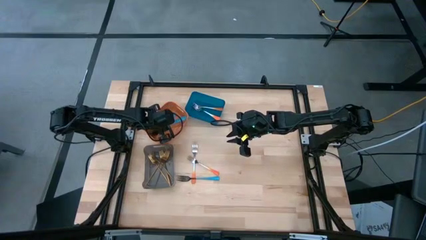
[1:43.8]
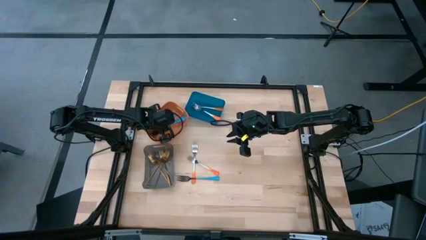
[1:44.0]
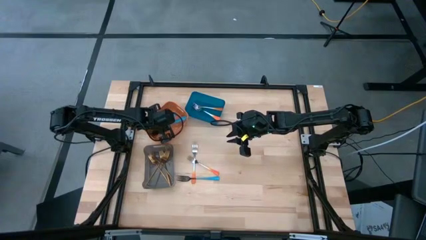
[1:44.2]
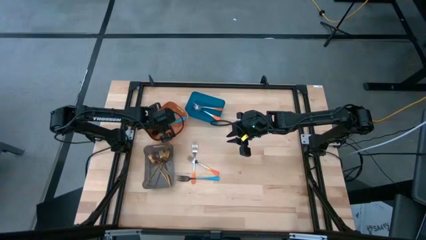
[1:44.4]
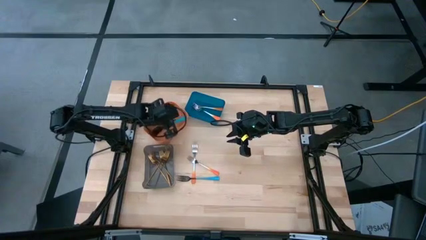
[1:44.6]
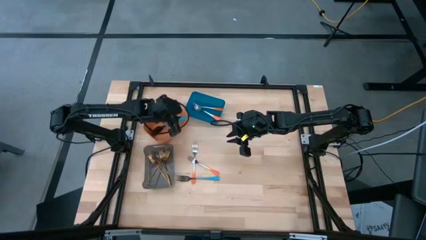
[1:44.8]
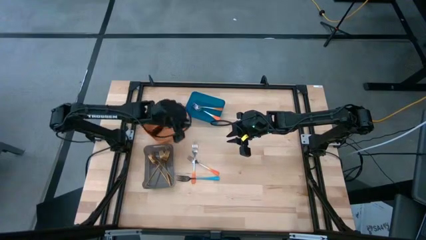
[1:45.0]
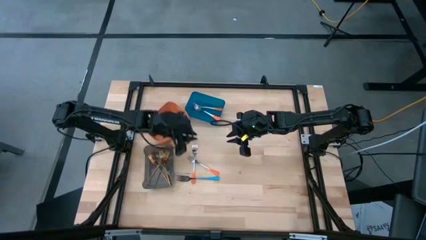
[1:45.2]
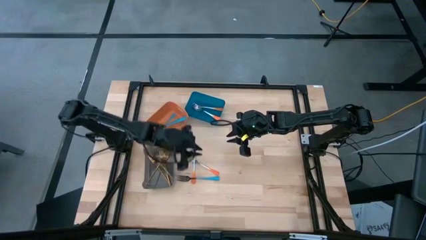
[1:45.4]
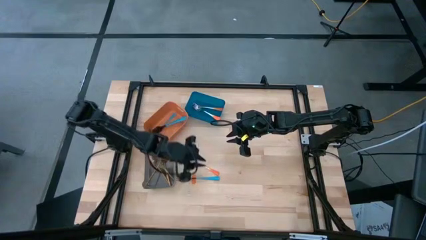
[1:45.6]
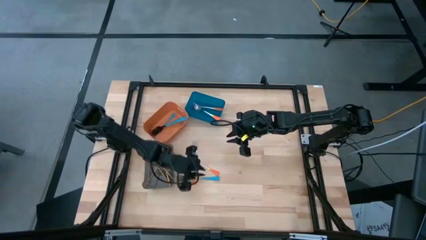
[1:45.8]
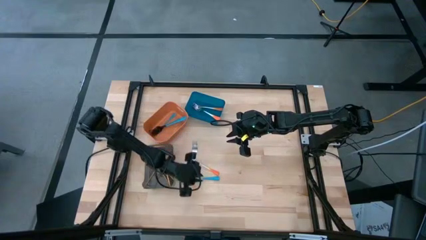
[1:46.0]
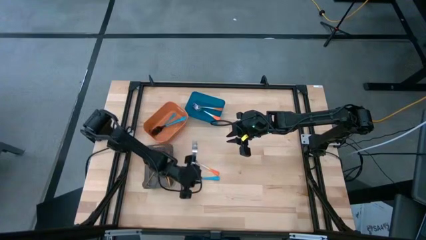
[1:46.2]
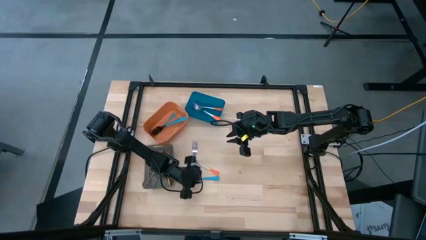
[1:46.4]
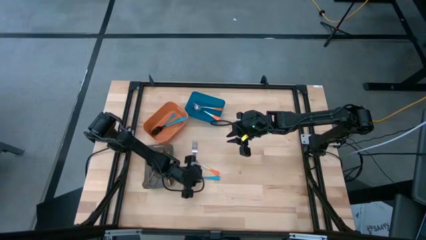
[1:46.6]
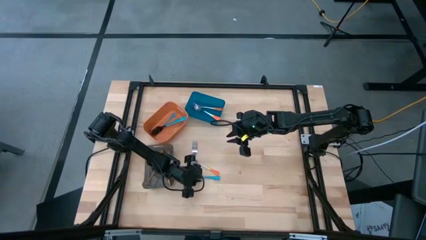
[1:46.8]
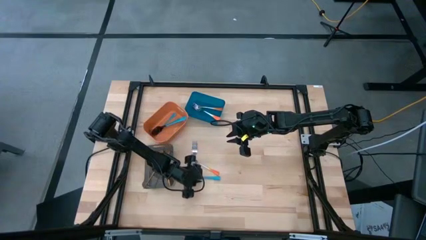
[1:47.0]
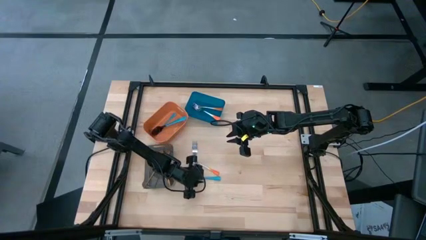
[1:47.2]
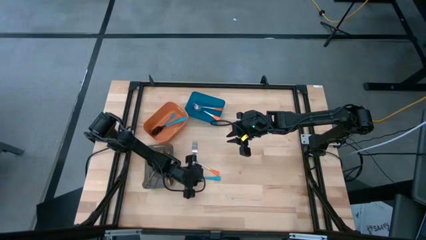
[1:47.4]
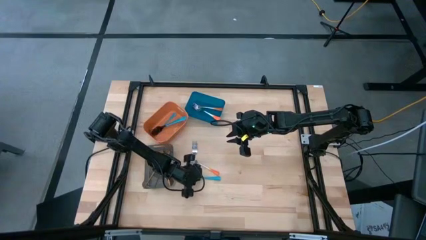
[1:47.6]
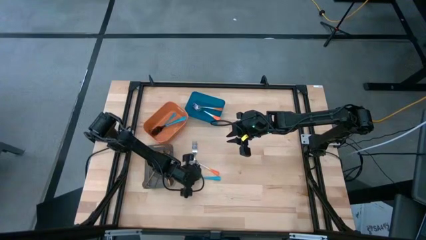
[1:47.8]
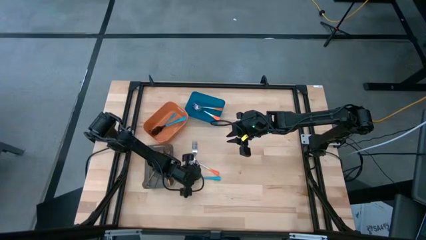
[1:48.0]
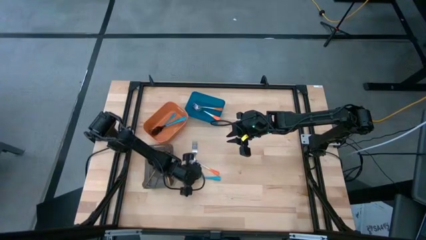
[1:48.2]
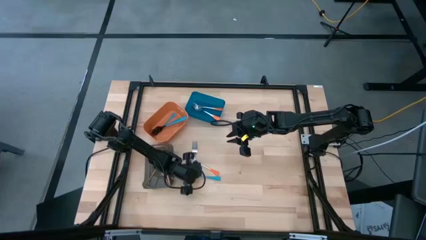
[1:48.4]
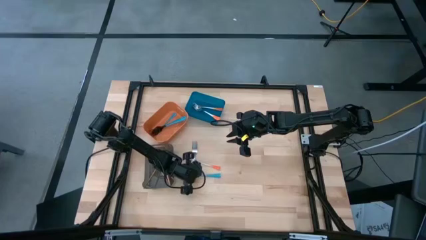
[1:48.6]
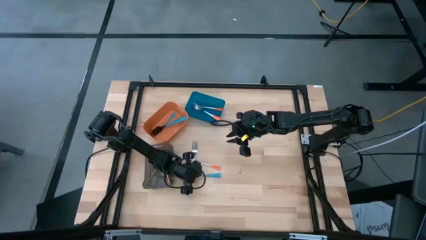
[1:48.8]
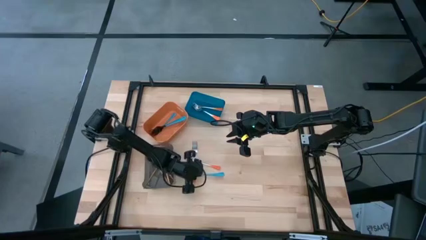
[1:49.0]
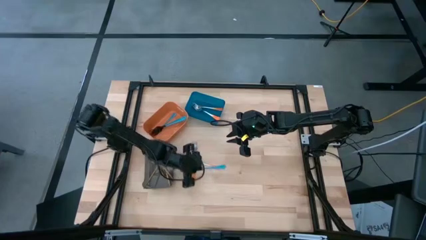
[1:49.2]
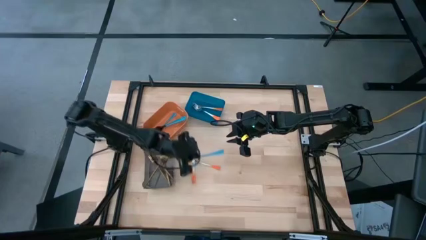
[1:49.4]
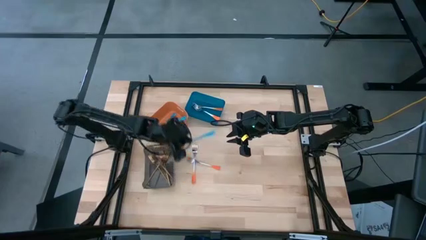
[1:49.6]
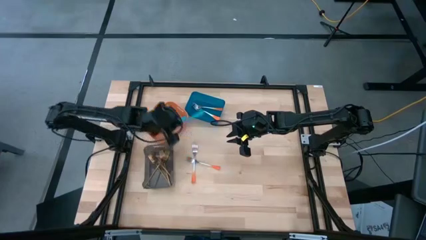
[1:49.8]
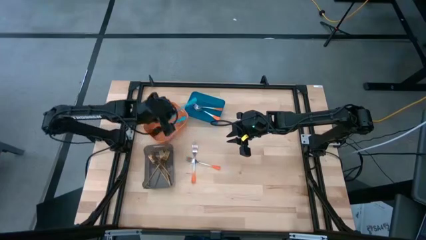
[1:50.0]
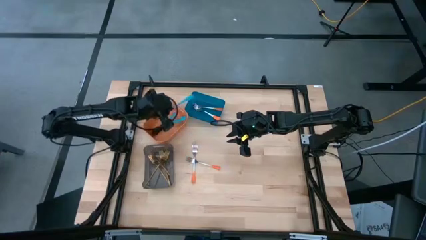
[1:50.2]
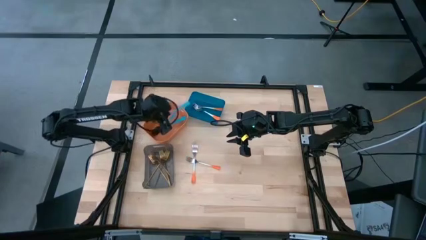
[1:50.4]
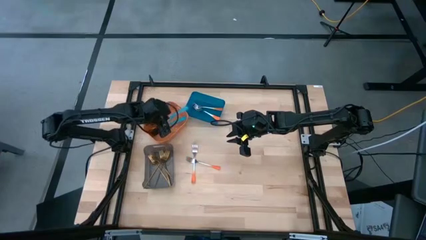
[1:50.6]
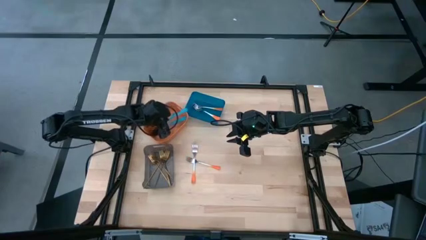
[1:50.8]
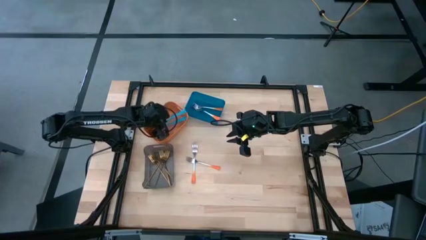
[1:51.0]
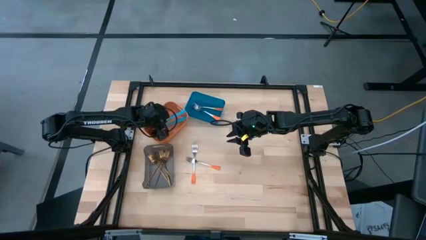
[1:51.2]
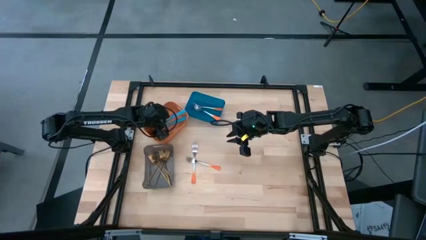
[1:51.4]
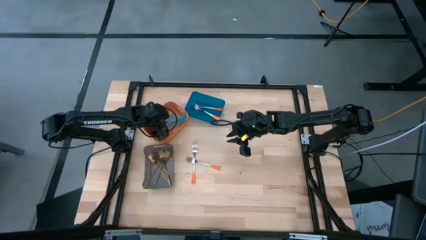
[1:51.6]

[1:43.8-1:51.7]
Task: Sort silverware by color (type)
Put the blue fork into the orange bin

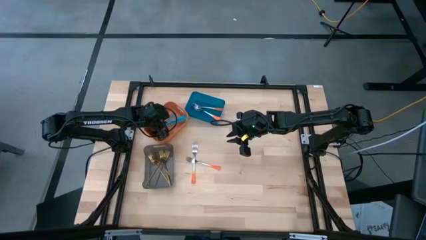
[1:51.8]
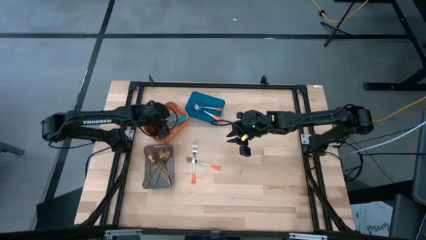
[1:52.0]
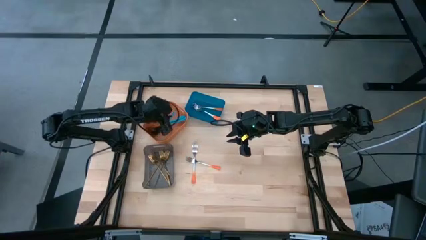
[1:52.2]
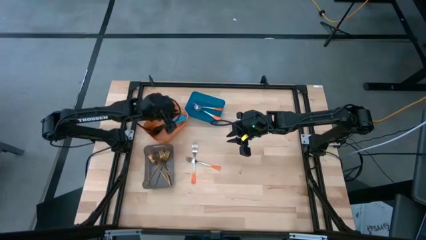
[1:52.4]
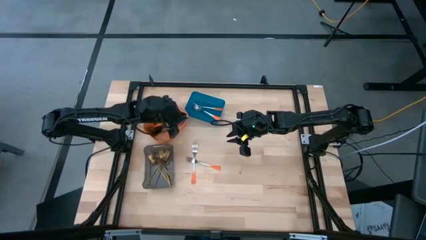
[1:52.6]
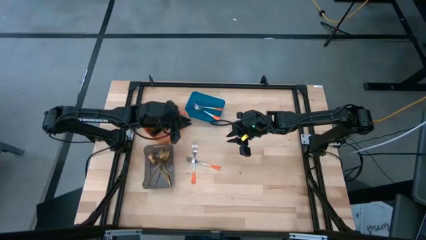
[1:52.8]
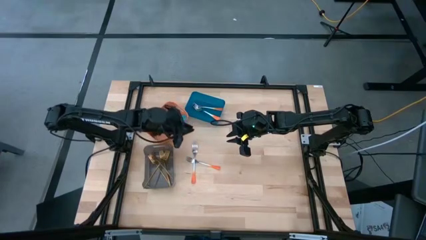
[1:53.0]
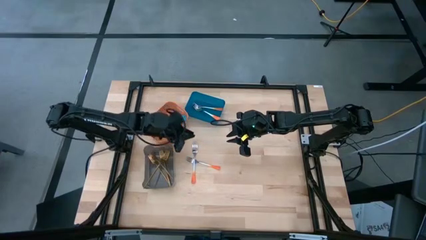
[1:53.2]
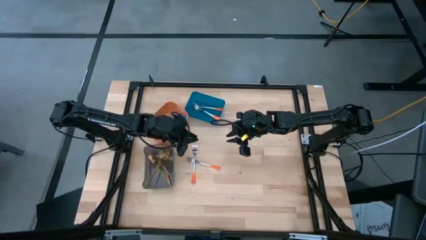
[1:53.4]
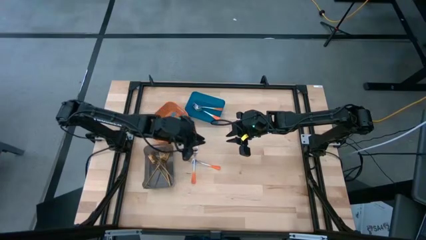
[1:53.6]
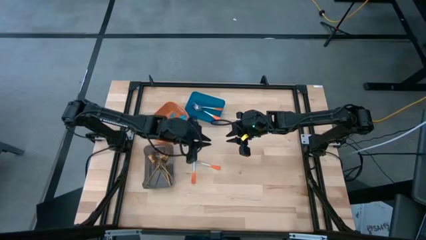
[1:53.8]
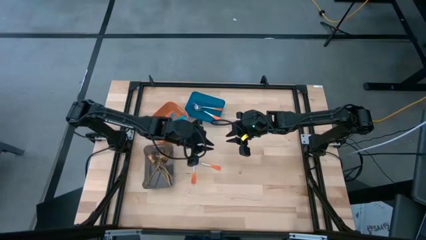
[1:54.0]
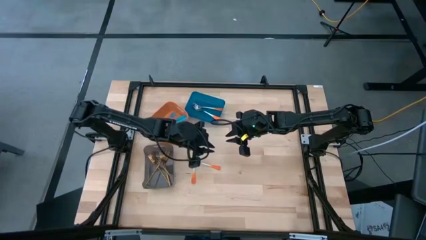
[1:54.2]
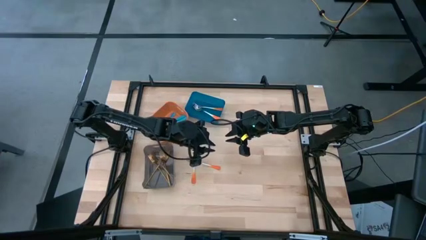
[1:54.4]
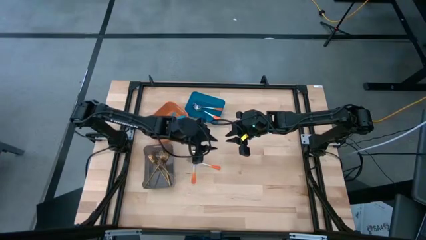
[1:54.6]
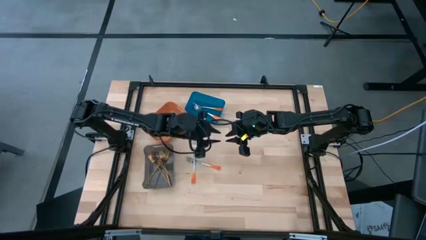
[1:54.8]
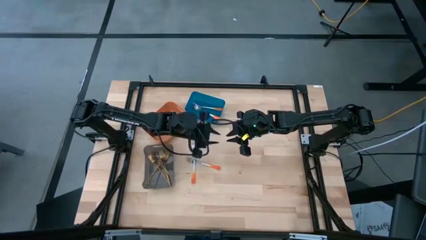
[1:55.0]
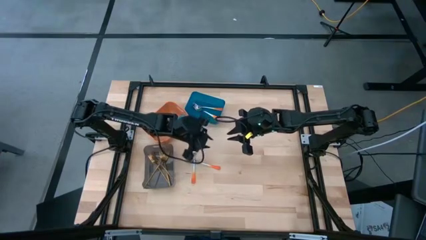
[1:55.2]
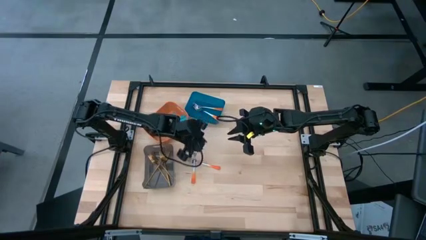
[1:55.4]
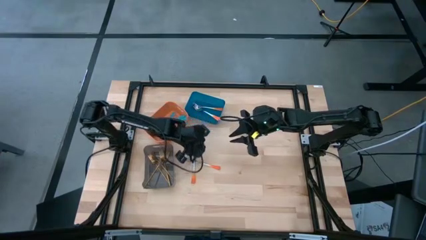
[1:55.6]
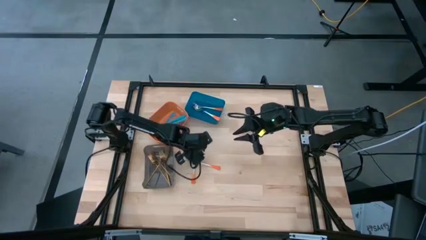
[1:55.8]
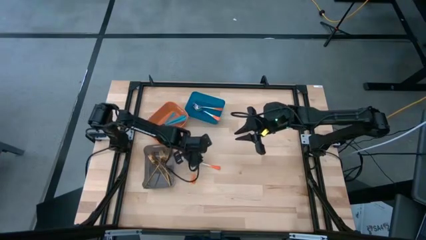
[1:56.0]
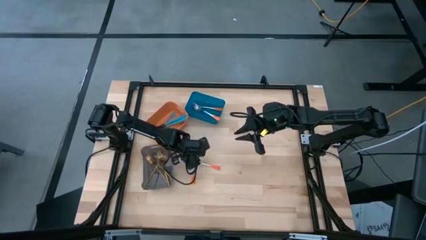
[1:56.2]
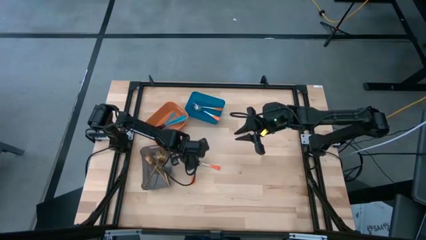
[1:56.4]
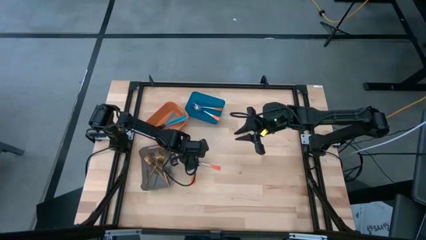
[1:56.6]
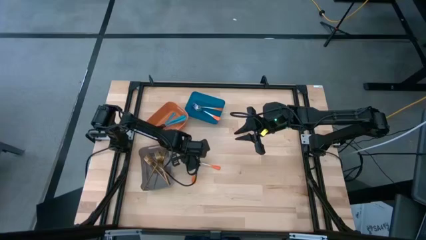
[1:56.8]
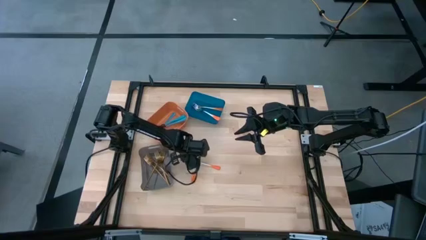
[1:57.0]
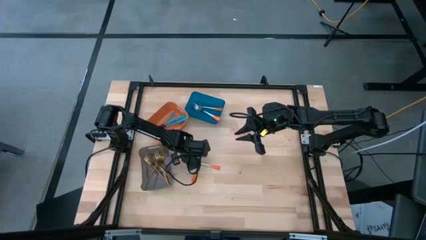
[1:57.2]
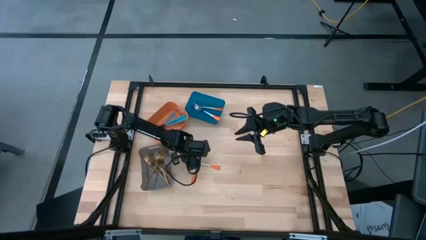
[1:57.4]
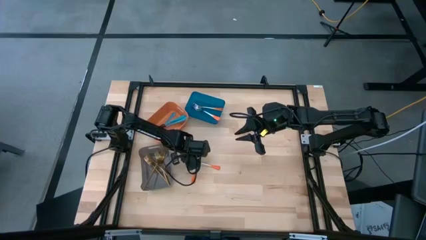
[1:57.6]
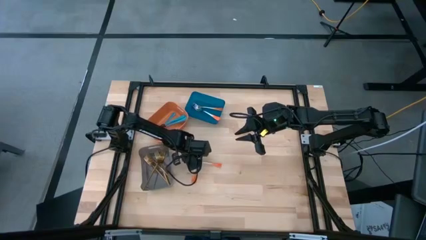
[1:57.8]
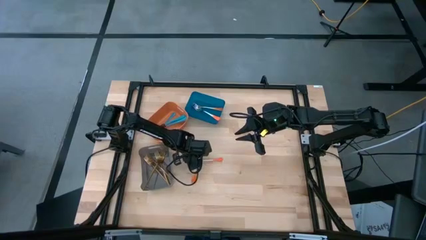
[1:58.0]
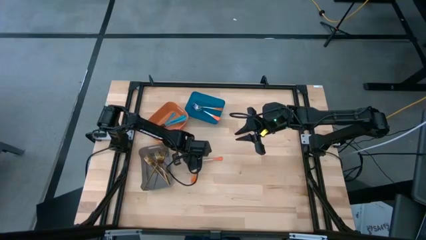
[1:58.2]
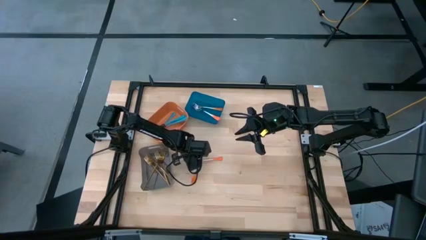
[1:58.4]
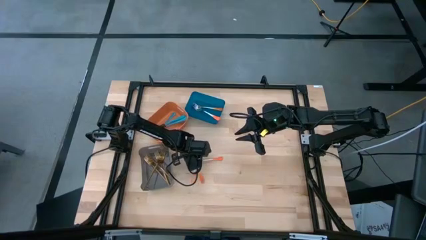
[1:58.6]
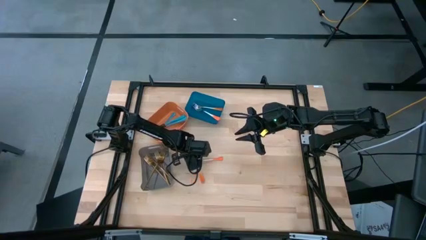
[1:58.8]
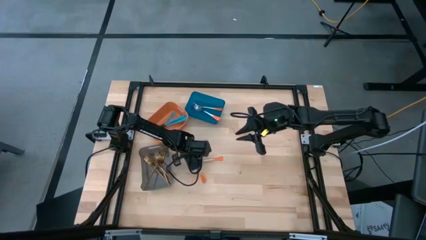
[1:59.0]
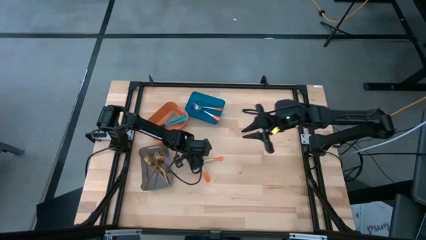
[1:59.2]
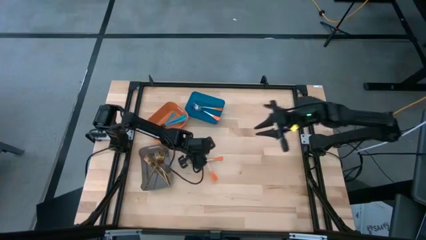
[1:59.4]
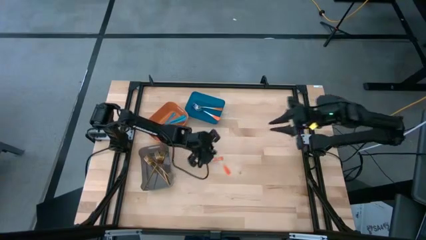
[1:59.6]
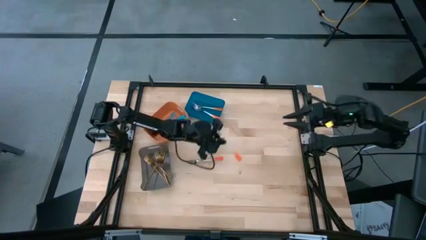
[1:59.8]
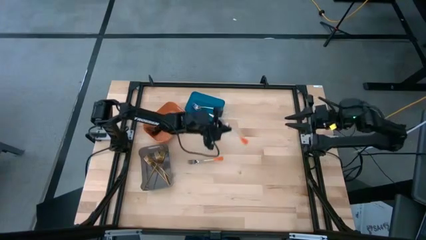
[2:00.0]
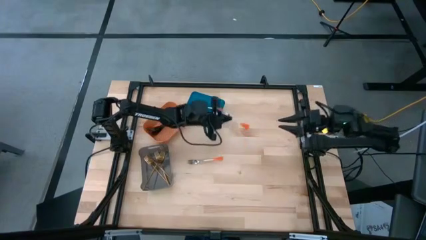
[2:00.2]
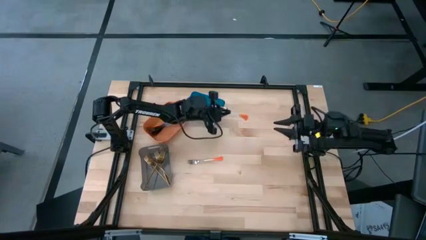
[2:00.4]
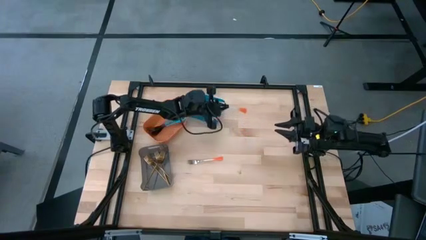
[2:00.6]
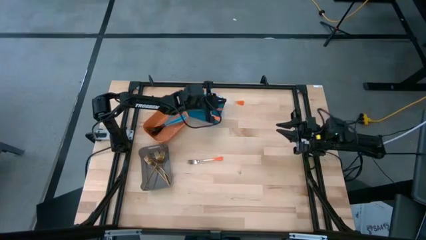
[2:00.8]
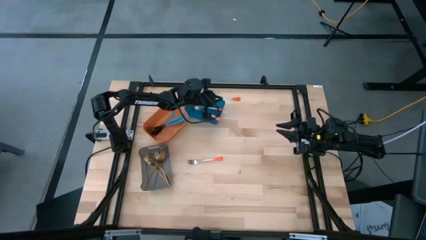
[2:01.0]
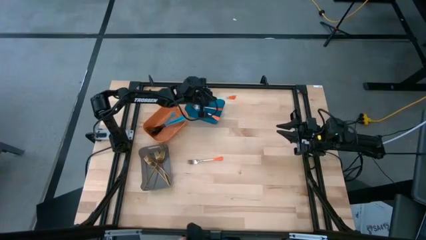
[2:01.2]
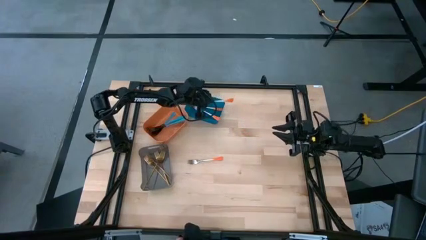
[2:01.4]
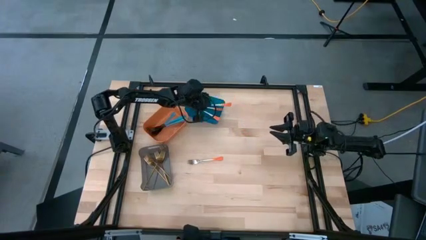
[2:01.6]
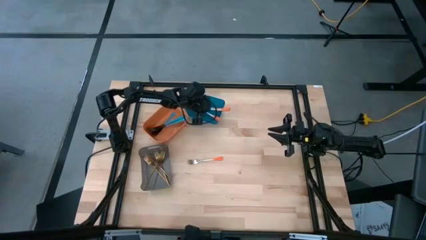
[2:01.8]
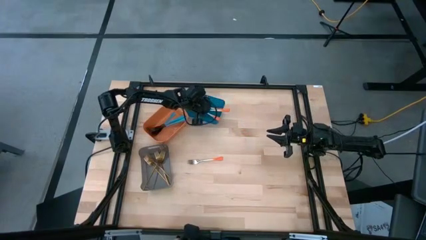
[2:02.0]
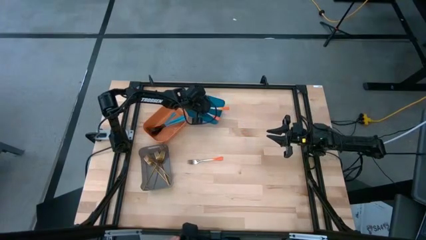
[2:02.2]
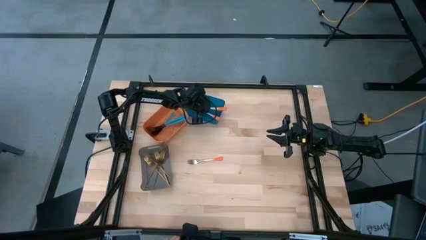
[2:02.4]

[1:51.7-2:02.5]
Put the orange fork into the blue bin
